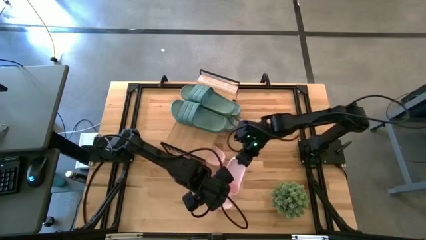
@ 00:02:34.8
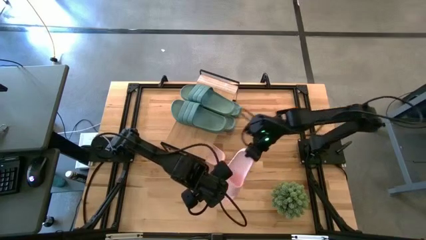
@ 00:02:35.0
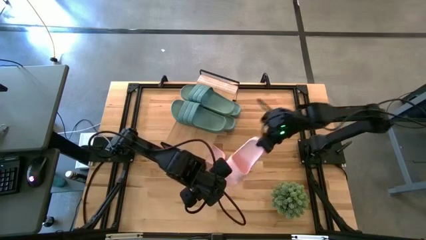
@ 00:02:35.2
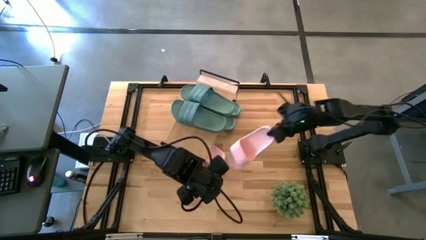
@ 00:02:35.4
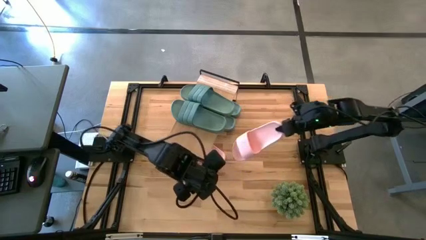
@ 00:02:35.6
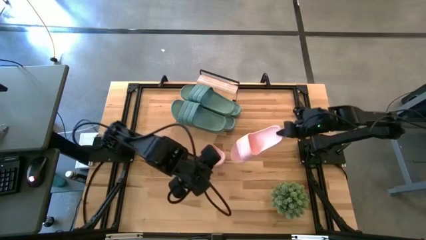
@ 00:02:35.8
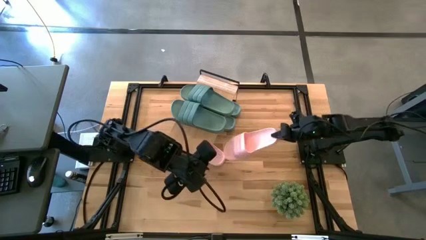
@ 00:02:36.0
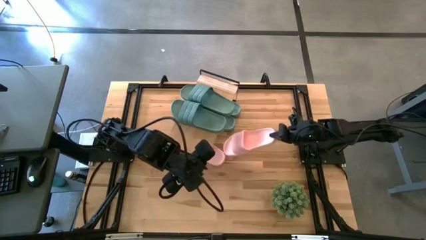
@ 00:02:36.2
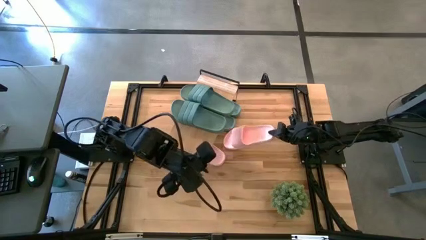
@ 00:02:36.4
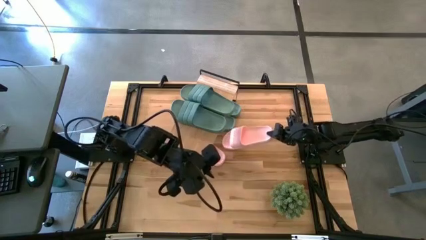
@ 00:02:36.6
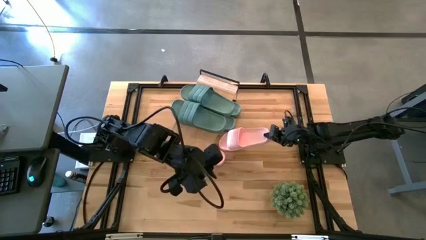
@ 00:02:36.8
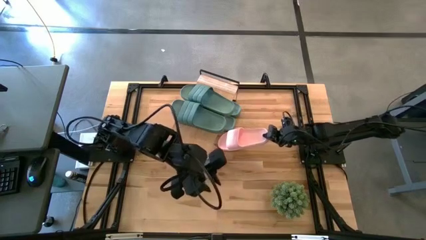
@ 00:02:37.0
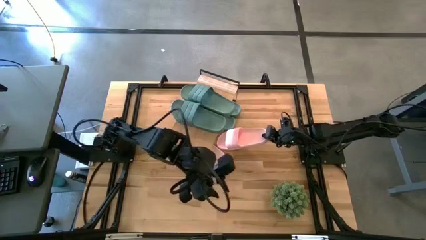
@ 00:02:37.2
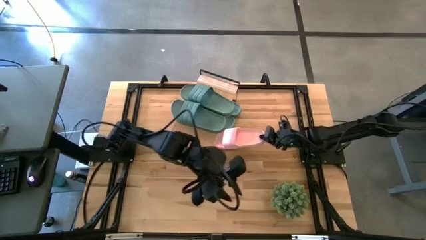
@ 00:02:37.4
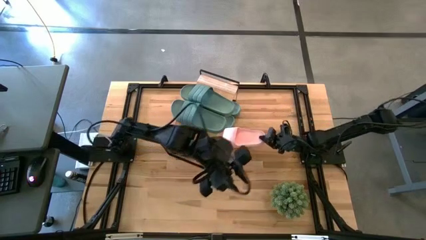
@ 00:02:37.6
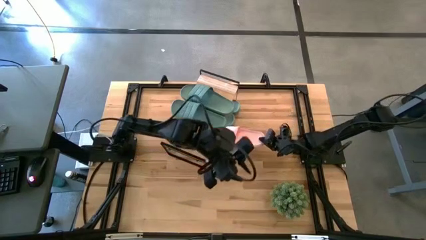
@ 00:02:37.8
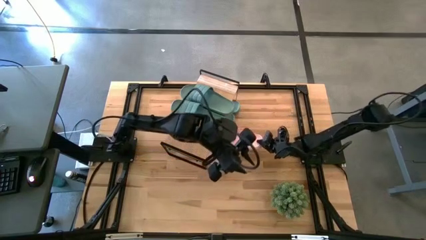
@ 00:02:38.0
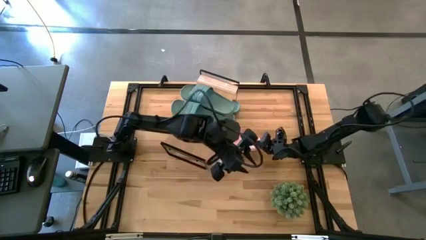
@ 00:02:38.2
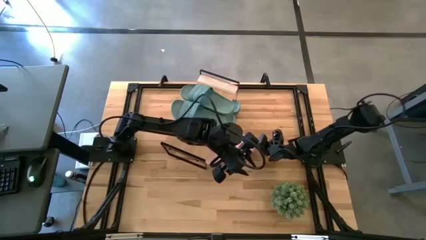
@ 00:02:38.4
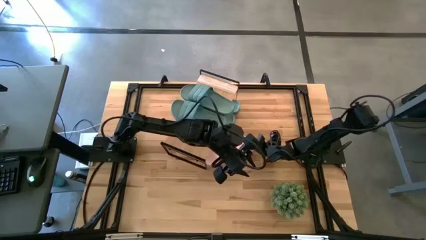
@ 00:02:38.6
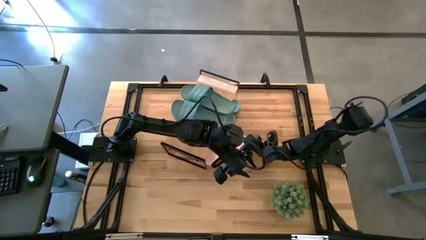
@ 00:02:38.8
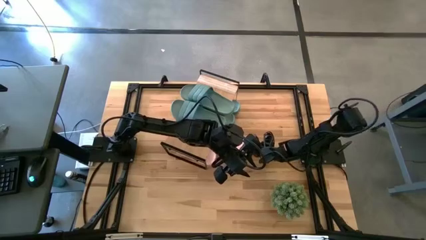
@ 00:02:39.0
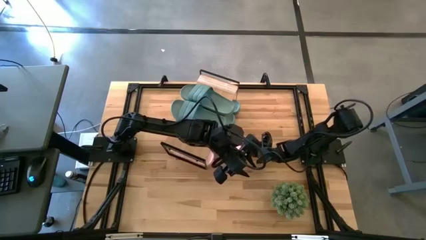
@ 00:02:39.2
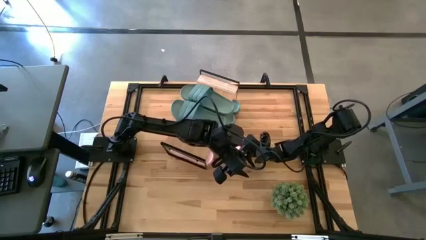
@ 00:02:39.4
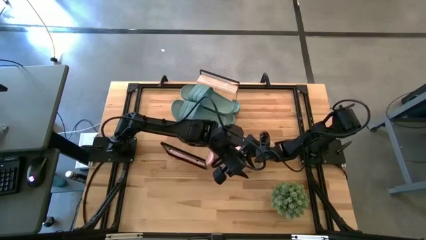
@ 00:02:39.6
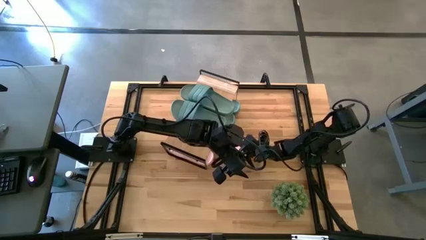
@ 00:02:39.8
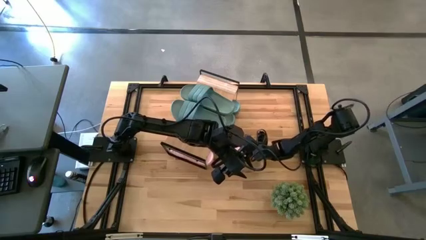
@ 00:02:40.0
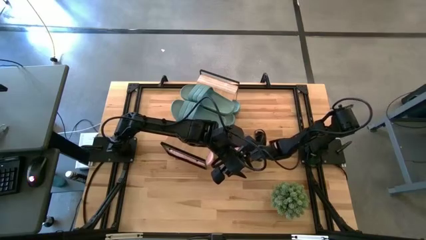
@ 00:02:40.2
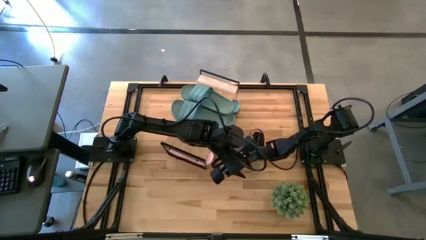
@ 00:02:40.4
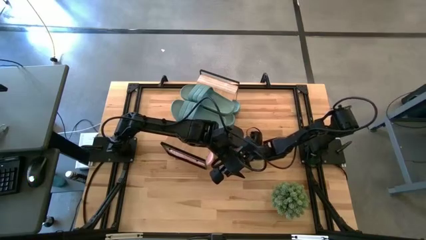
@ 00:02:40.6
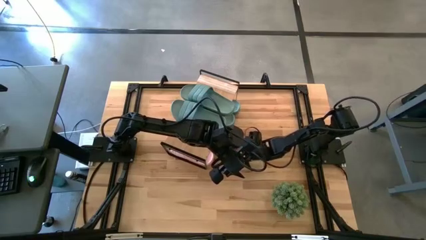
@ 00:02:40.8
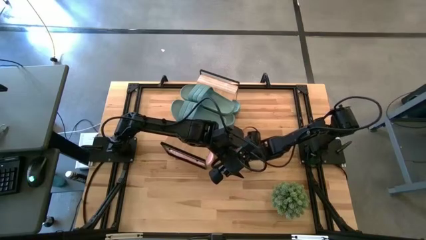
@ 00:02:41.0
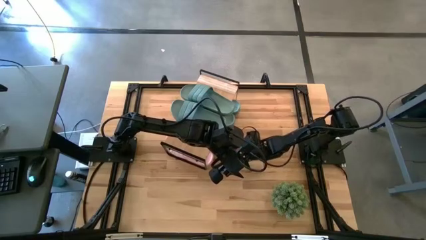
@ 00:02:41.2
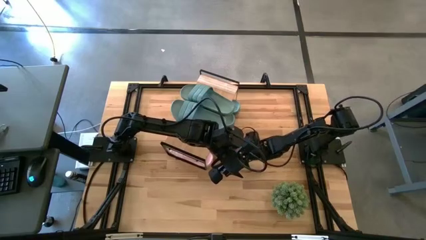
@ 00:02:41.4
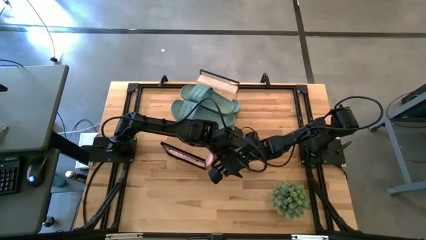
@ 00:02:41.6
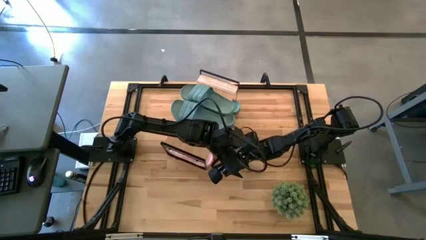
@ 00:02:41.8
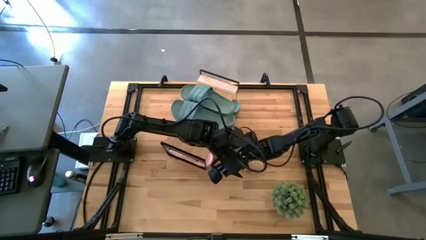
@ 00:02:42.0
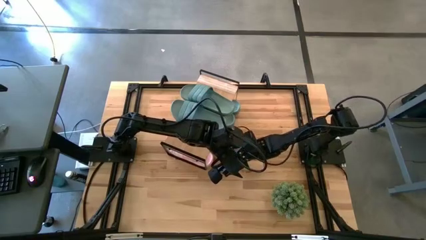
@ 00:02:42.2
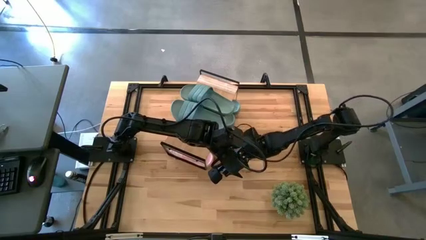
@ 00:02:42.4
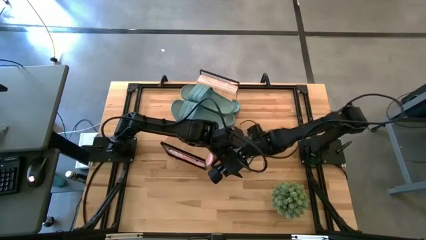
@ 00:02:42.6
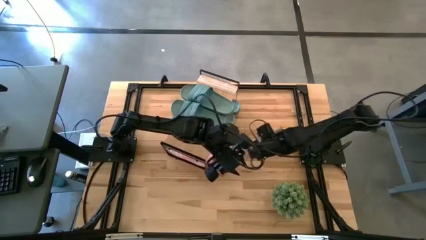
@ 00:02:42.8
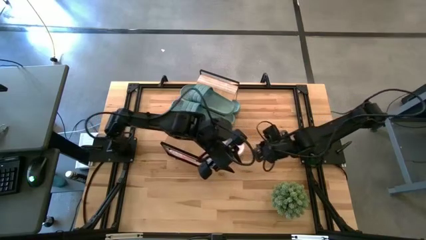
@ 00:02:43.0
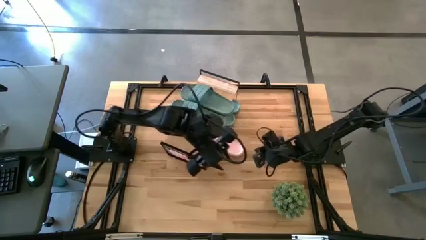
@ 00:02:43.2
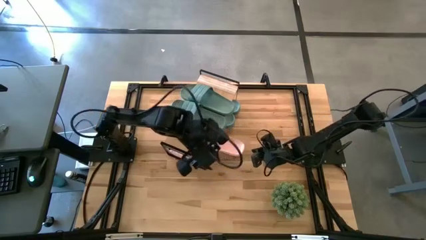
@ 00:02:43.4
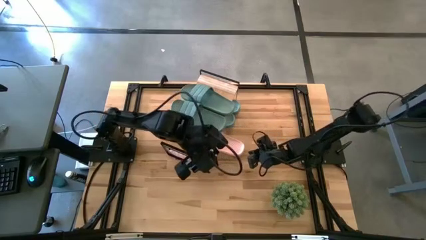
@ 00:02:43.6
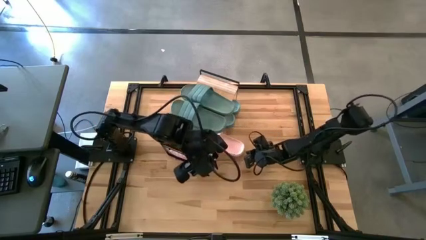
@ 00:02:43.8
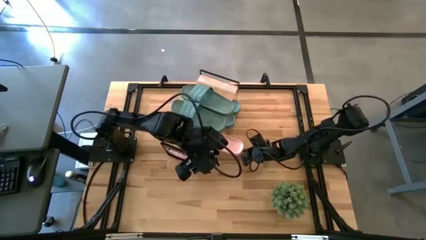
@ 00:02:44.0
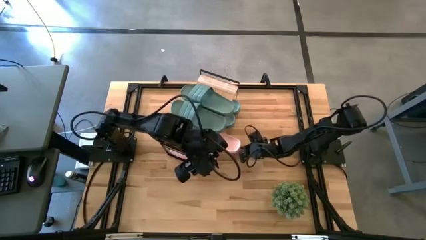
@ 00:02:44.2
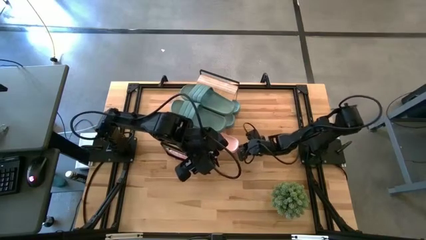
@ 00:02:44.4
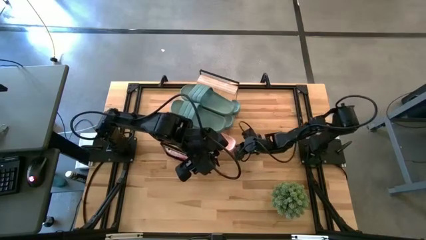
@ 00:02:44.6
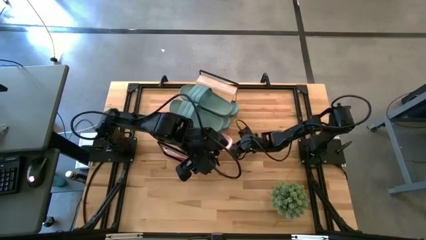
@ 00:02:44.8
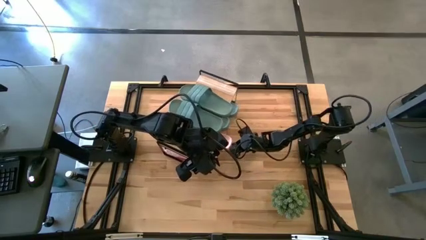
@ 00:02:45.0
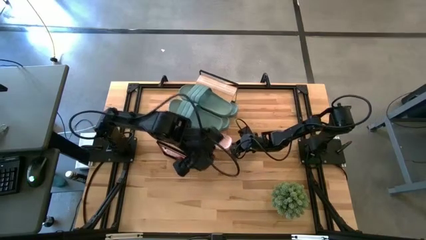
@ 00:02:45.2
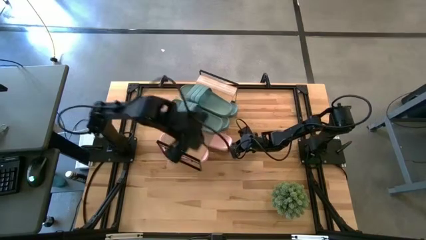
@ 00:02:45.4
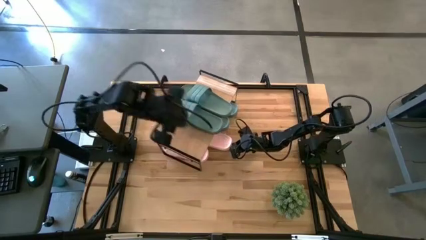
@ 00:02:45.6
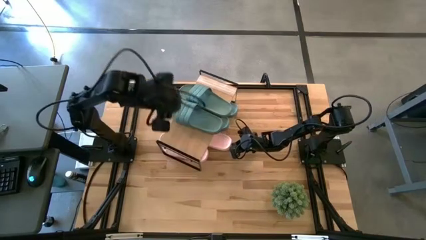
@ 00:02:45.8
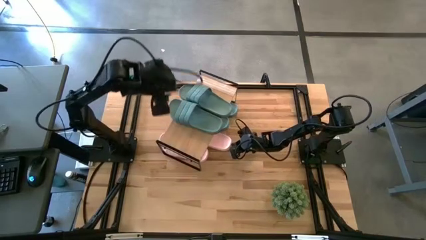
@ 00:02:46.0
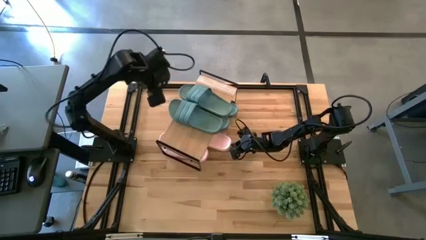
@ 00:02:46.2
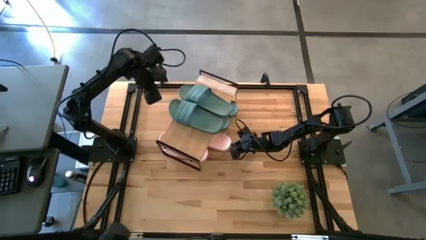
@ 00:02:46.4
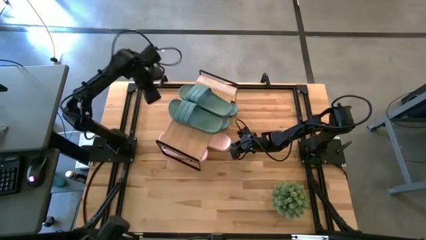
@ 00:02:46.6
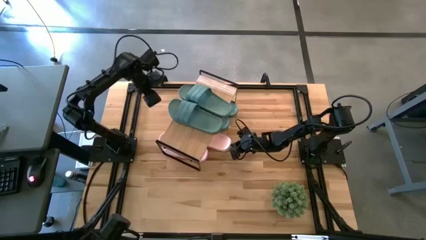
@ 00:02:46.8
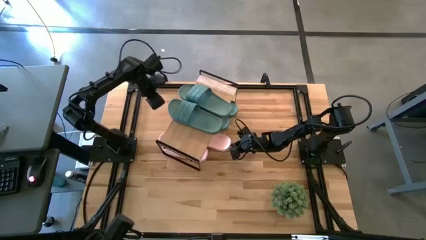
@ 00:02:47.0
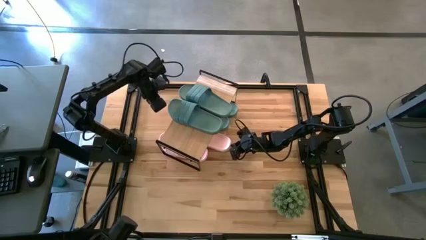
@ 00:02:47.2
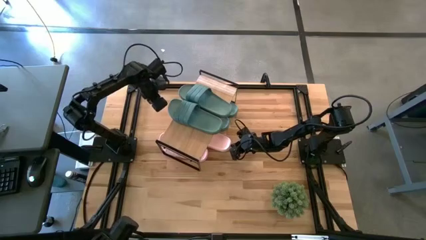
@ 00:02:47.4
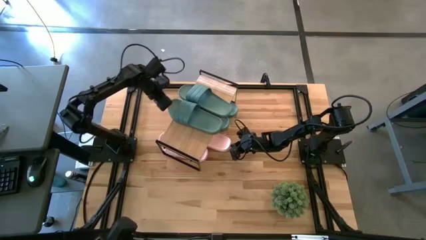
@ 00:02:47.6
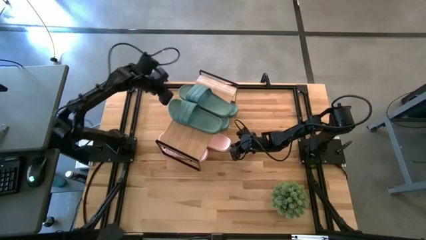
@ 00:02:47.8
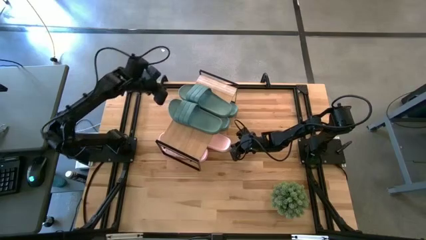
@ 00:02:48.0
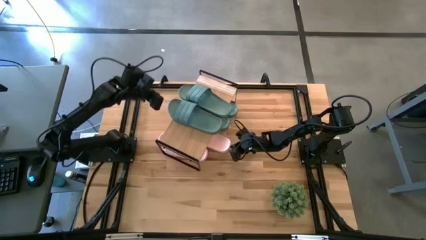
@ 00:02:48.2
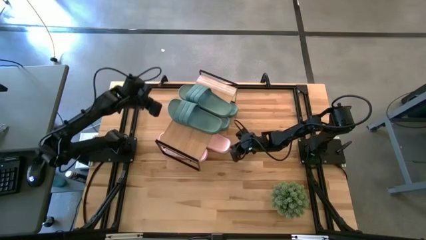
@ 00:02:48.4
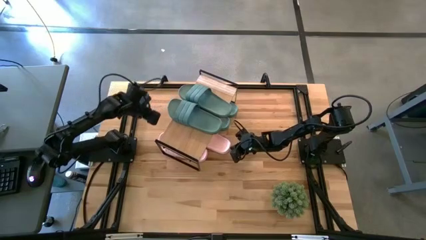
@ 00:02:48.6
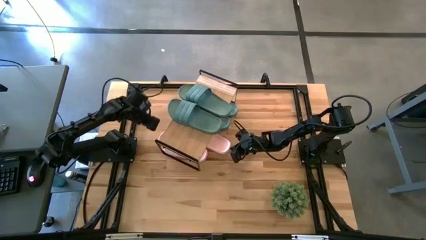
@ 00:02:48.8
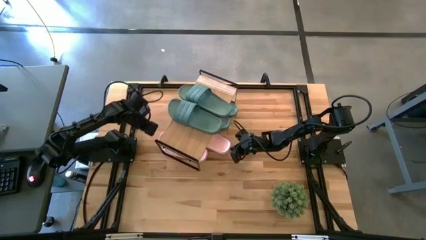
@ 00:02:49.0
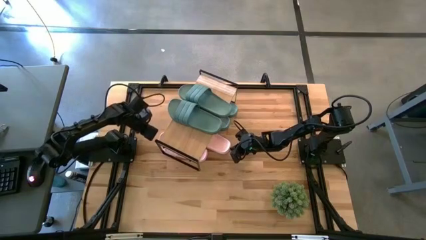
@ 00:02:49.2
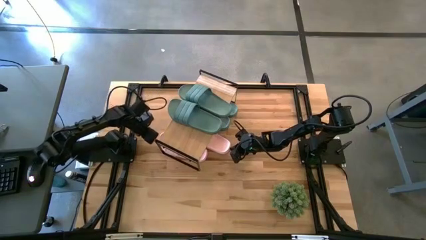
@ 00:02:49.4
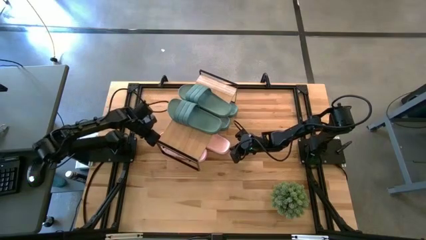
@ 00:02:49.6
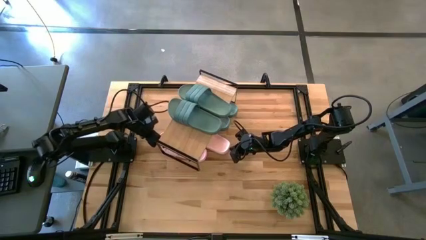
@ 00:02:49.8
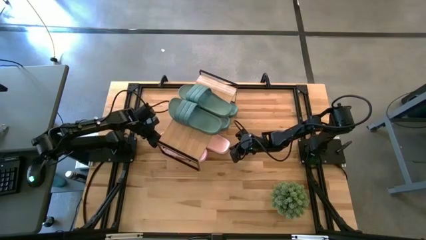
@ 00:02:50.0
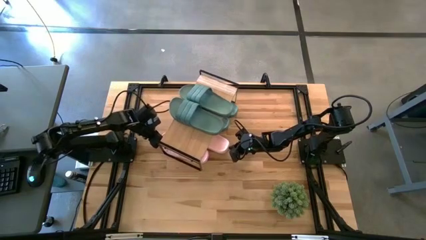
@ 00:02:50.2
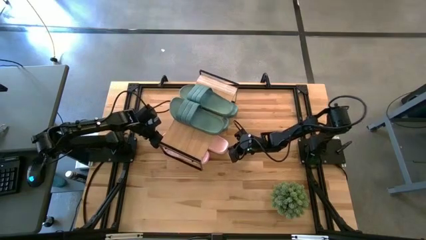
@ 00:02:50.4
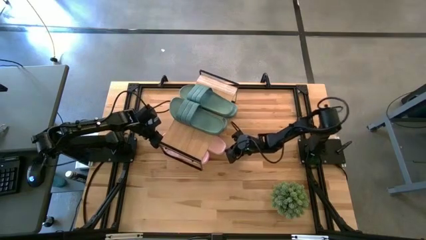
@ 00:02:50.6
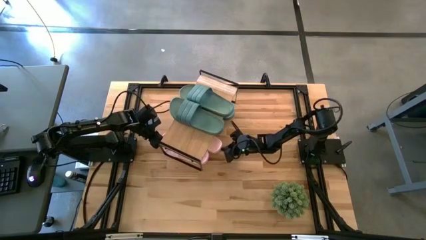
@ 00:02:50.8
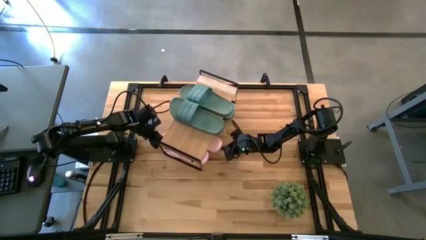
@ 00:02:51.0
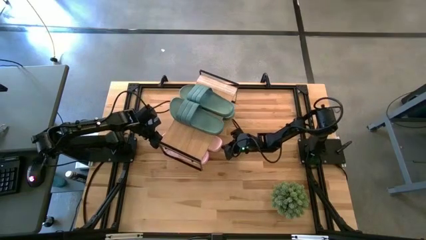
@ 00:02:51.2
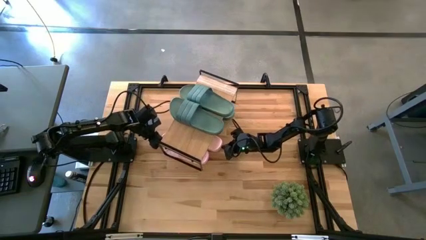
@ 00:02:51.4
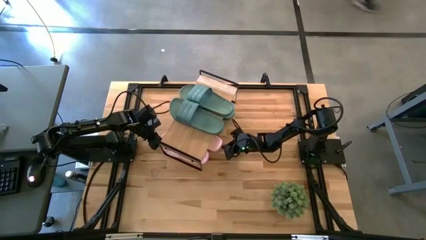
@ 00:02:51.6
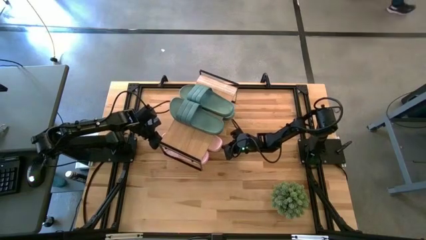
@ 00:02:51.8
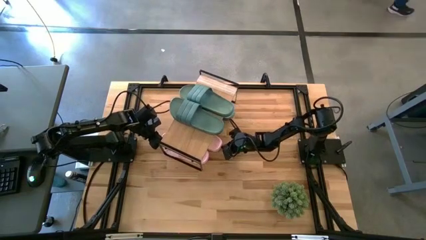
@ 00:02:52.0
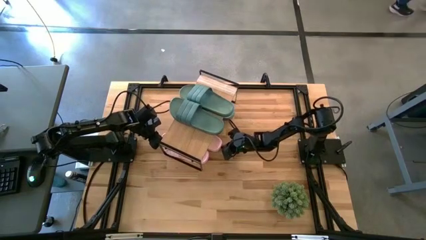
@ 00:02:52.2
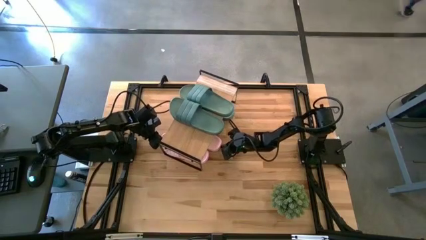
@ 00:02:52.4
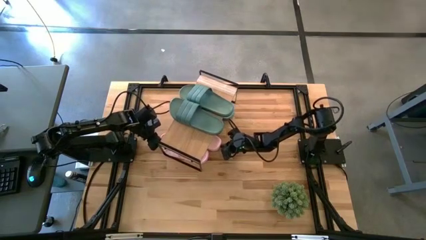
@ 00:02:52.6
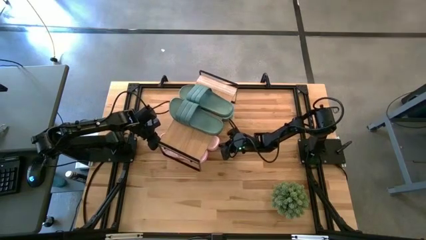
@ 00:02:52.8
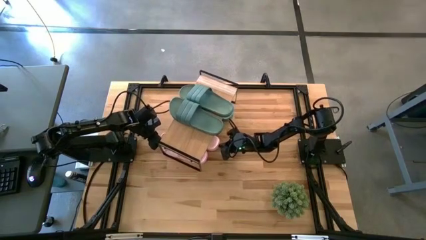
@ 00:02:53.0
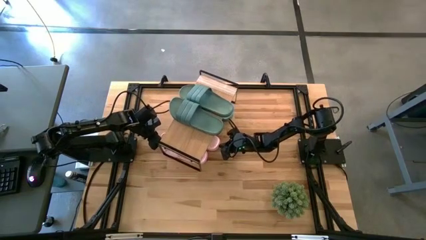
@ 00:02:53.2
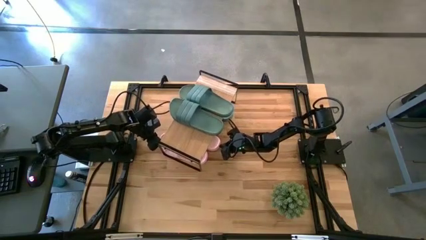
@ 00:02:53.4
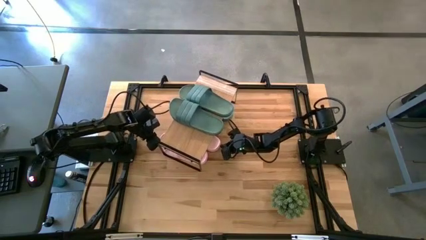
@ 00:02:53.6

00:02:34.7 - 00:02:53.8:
Task: Pick and place slides into the shelf
Put the pink slide on the shelf
